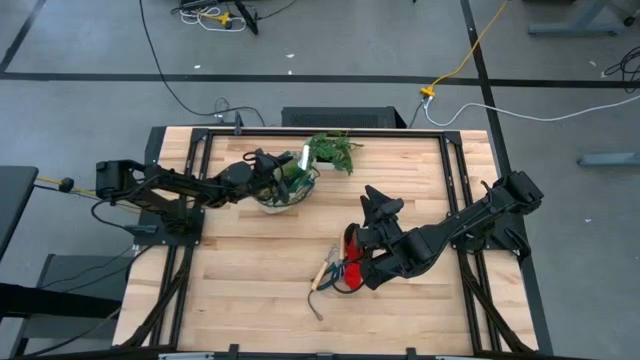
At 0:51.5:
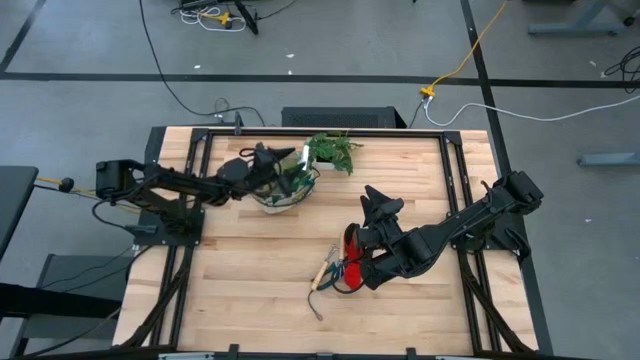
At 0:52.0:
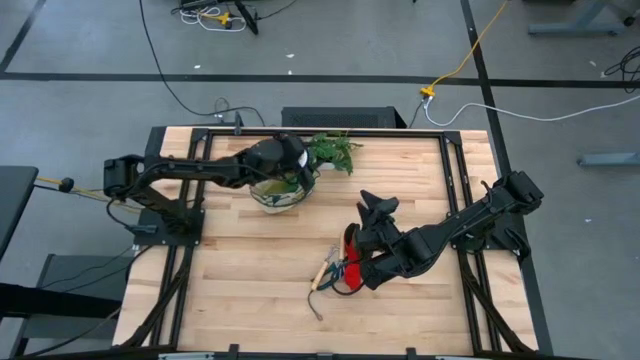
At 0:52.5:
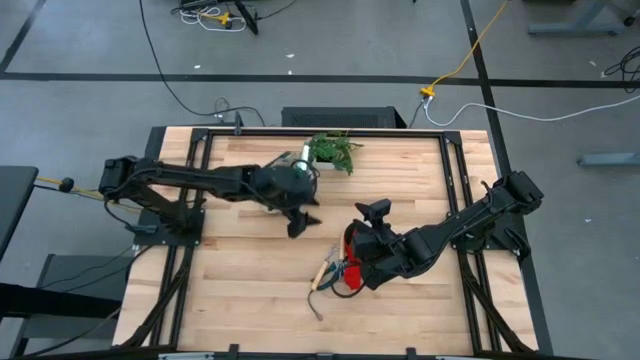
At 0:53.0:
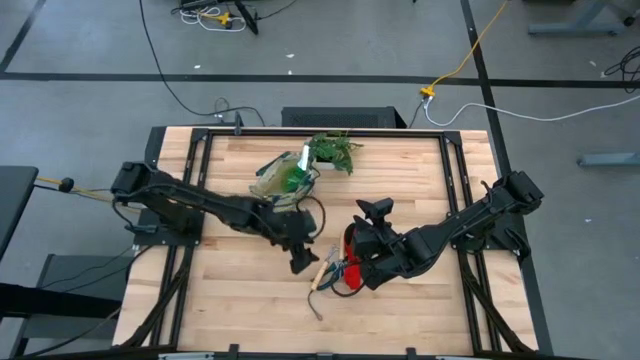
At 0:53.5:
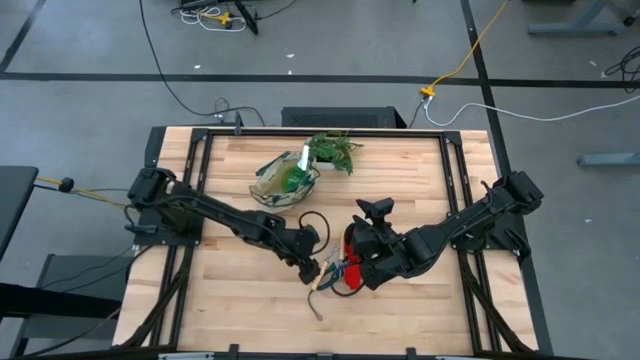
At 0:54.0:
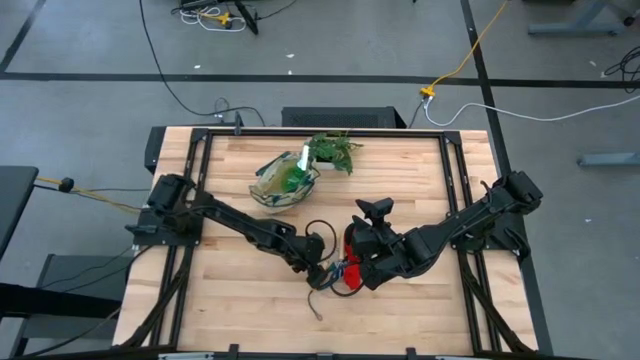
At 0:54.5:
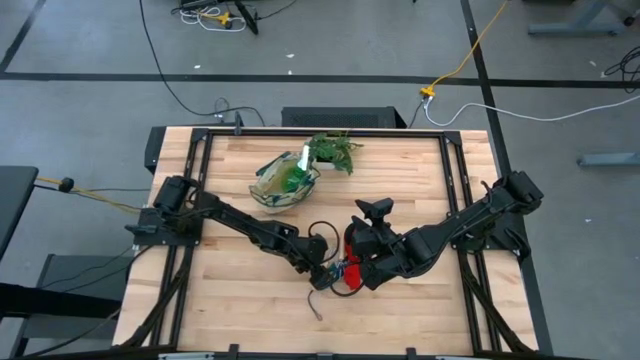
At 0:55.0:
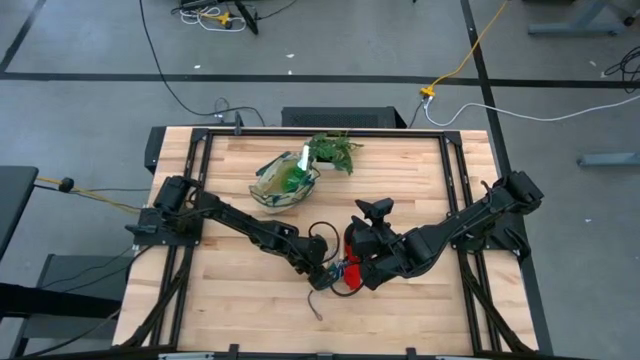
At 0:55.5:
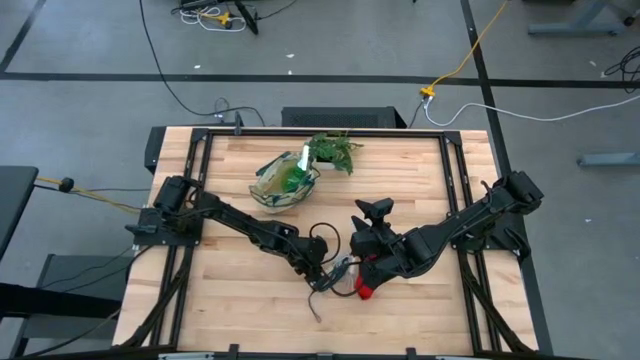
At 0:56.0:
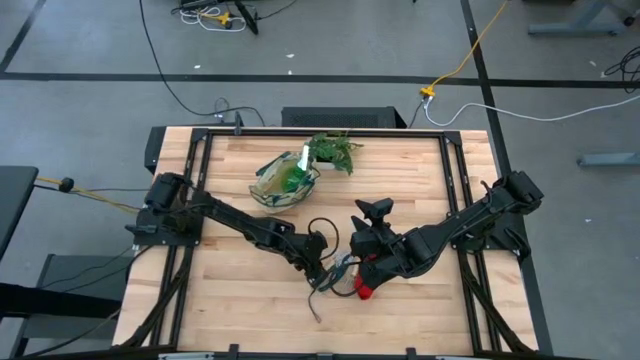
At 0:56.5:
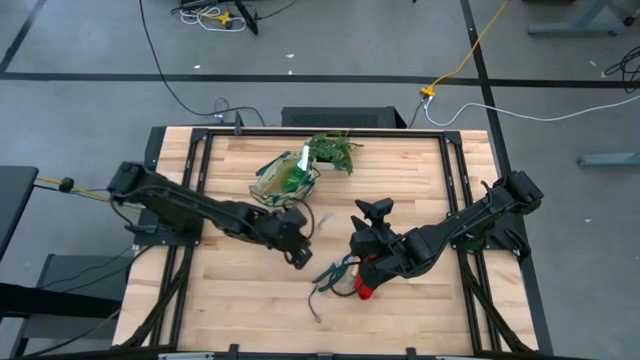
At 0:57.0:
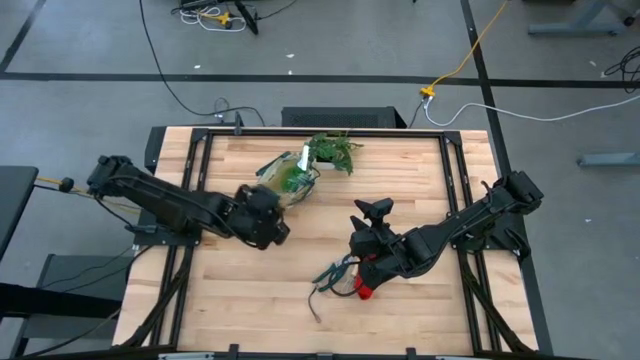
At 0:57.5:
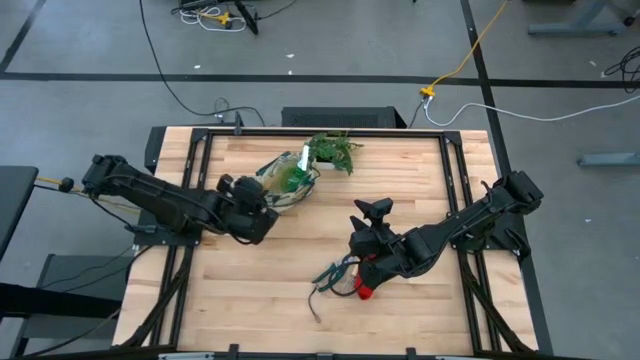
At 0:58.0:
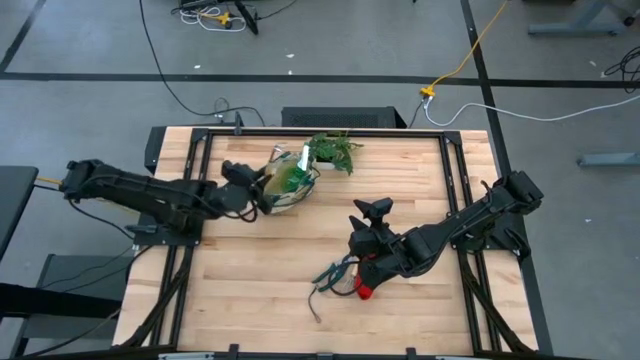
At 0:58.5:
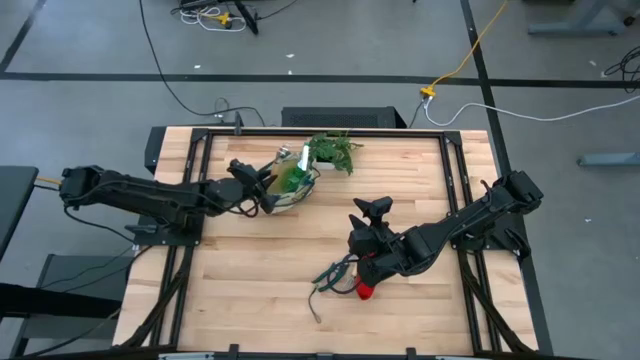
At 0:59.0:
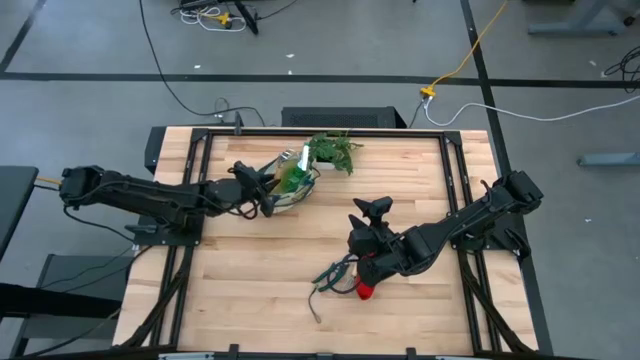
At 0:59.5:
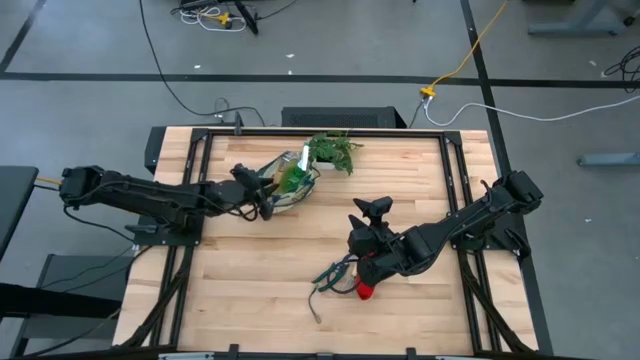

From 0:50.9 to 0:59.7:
Task: Pick & Place Garden tools in Gardening bag
Put the left brown hand rake into the gardening bag

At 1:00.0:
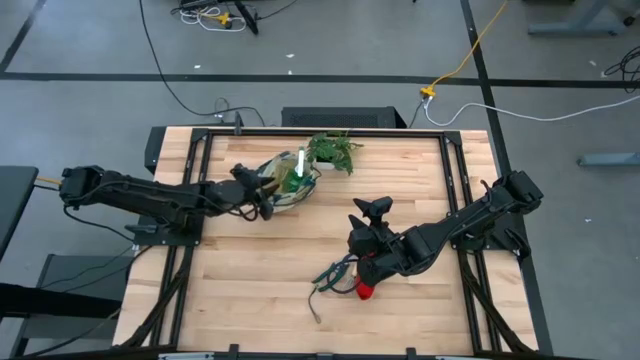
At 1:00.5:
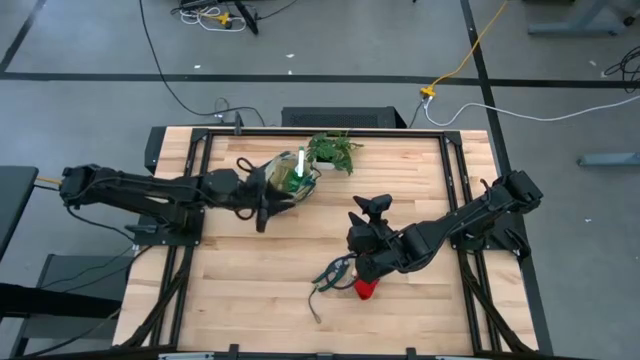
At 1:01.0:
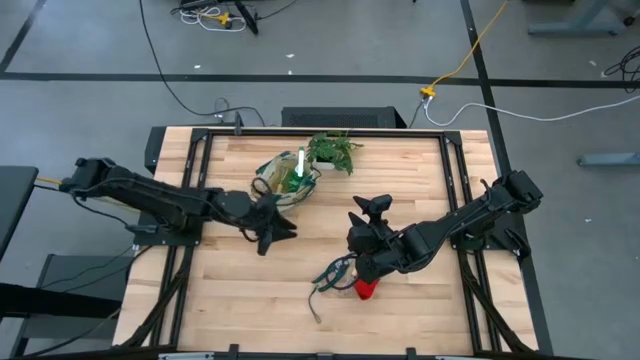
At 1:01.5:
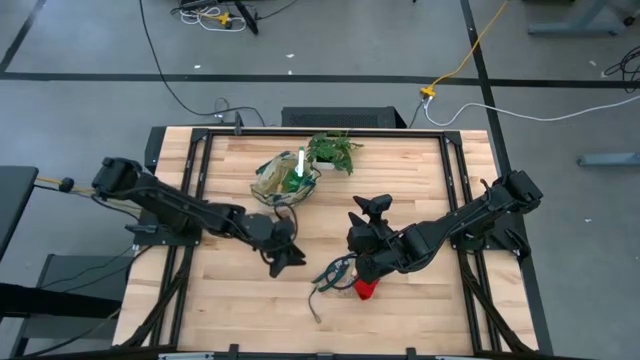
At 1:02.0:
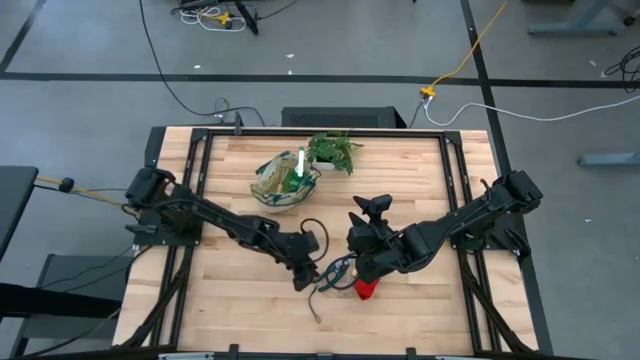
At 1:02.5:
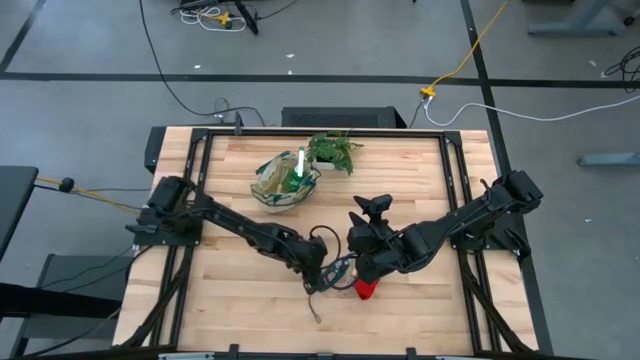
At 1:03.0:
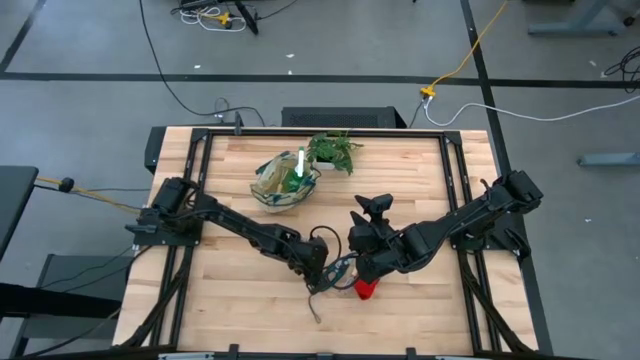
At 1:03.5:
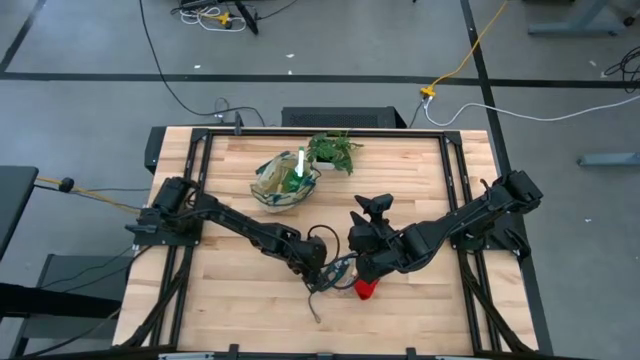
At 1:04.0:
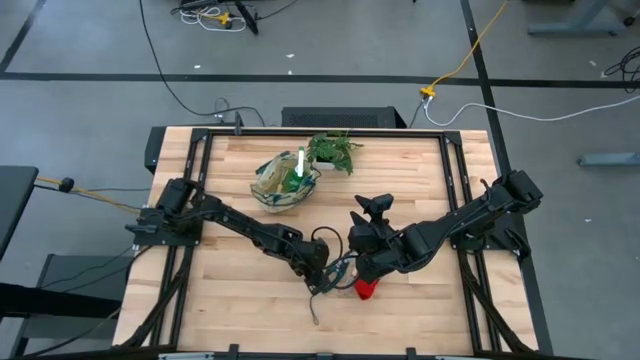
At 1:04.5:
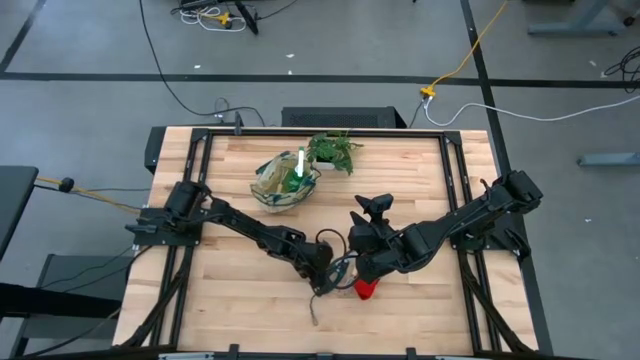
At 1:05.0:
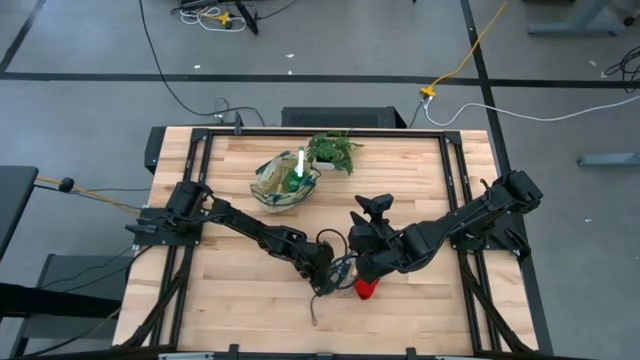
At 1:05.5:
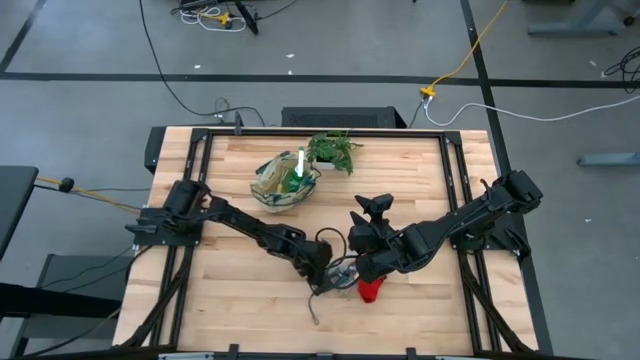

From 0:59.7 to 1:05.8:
Put the green shear scissors into the gardening bag

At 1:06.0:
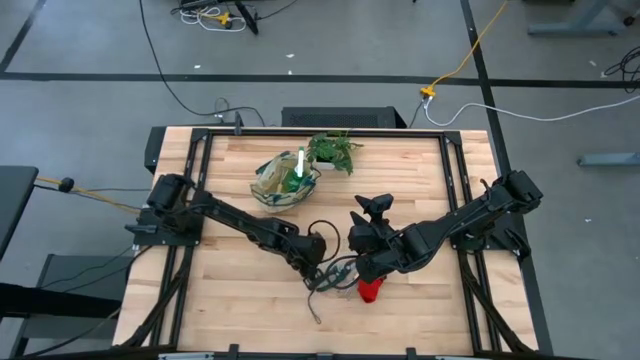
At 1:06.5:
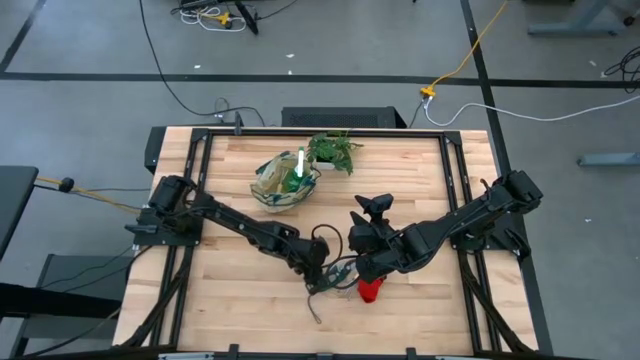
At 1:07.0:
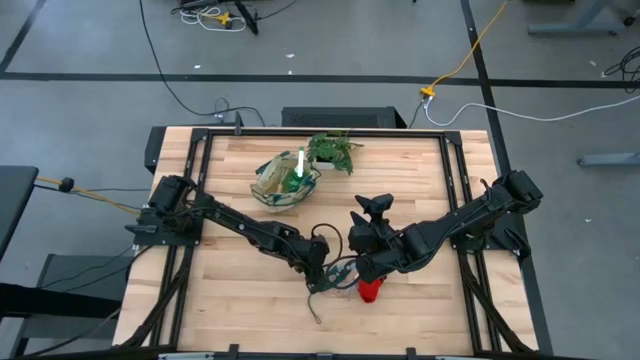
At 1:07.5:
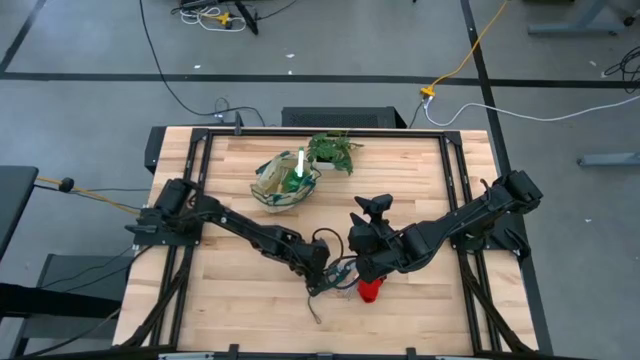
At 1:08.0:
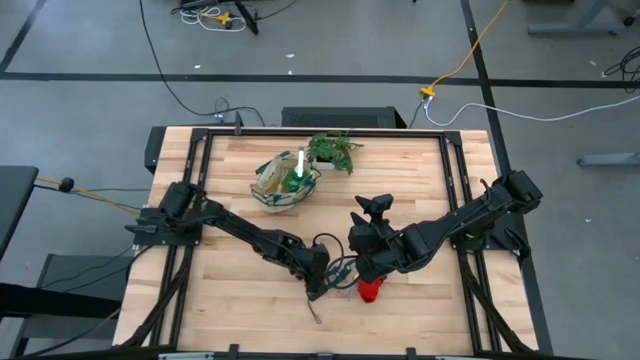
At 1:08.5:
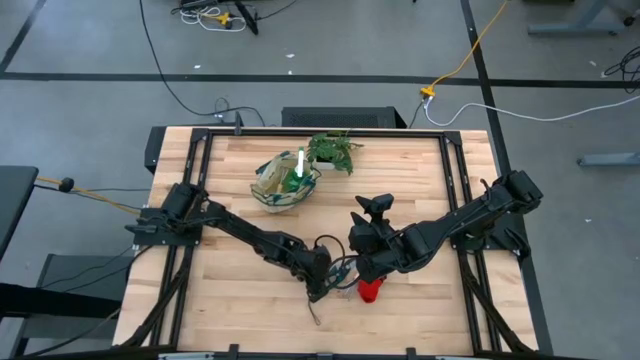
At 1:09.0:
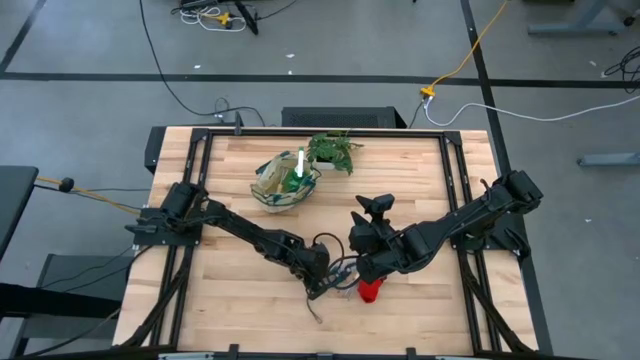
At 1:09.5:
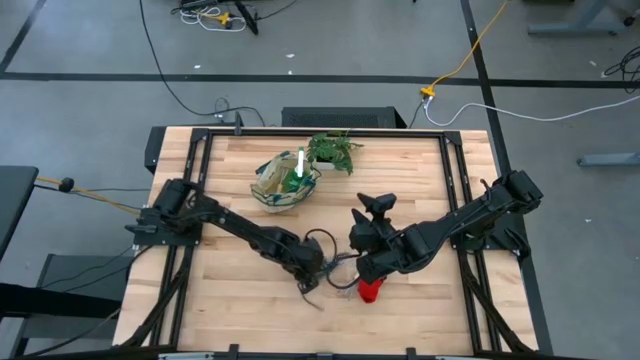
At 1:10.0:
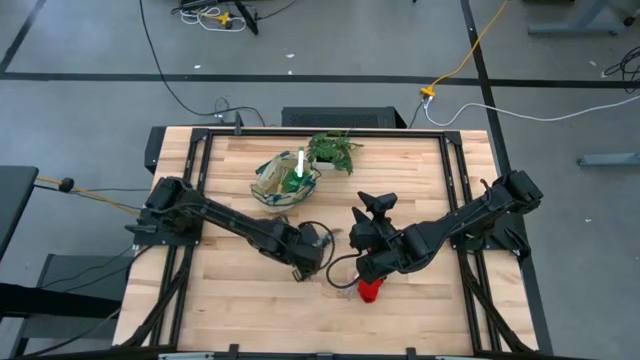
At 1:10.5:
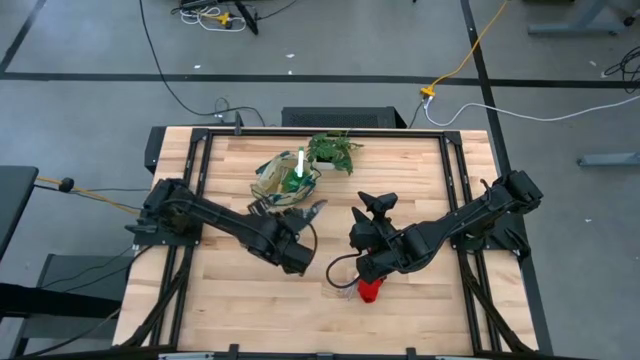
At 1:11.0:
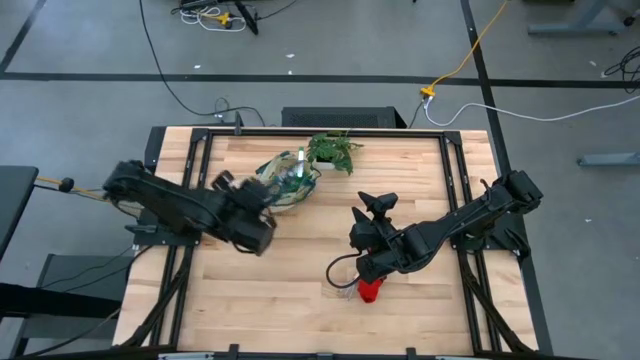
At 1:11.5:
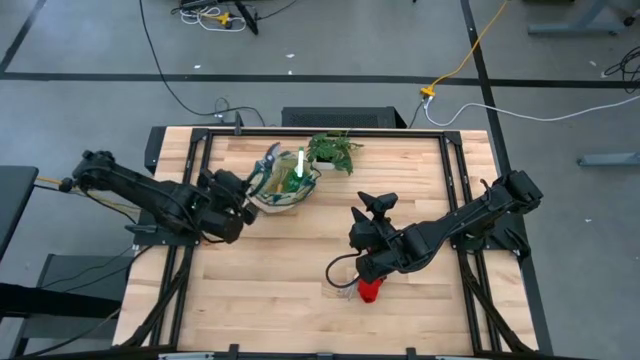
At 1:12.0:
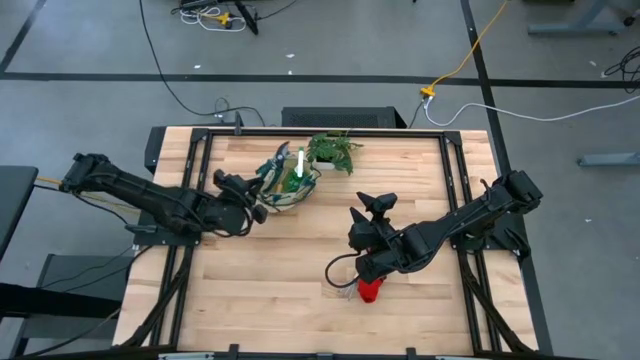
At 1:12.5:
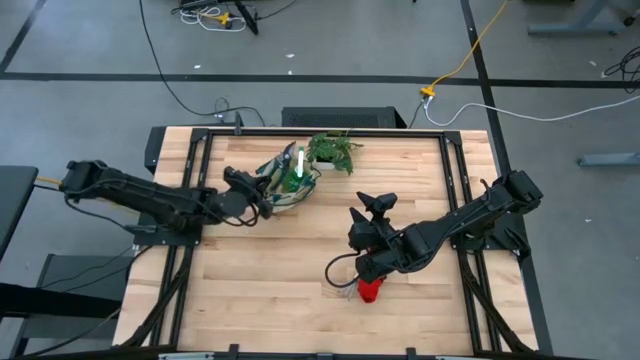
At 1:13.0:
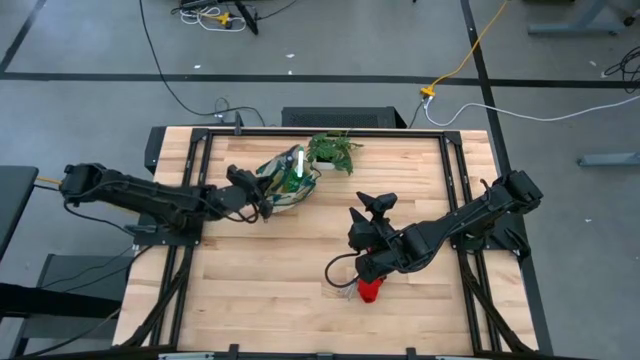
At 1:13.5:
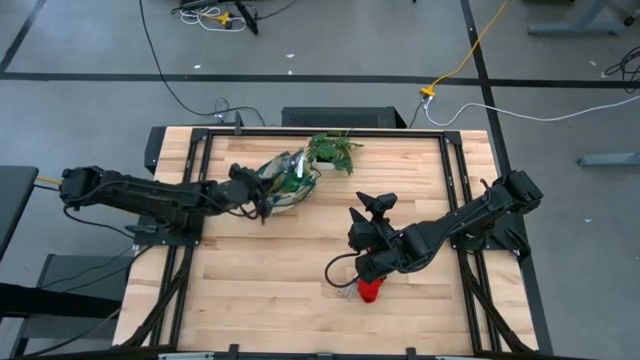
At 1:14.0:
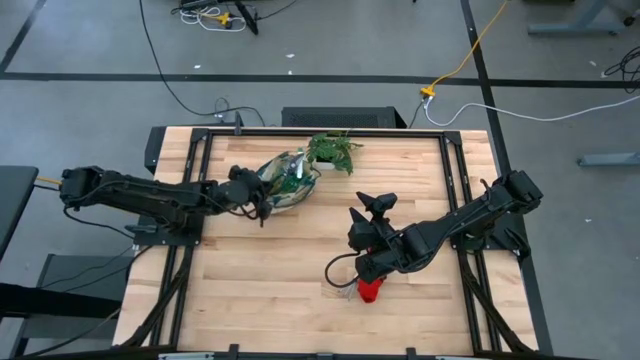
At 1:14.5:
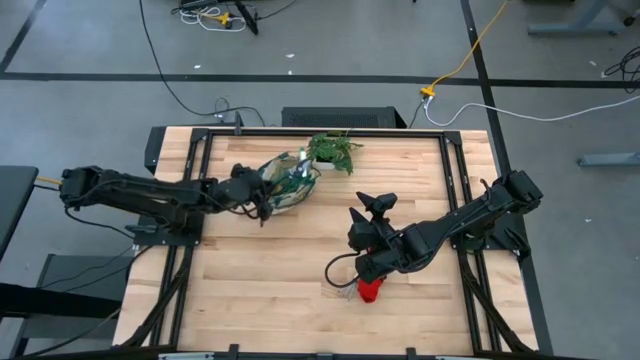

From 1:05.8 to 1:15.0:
Put the green shear scissors into the gardening bag
